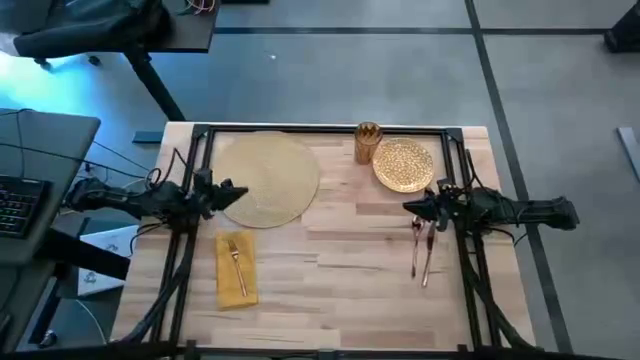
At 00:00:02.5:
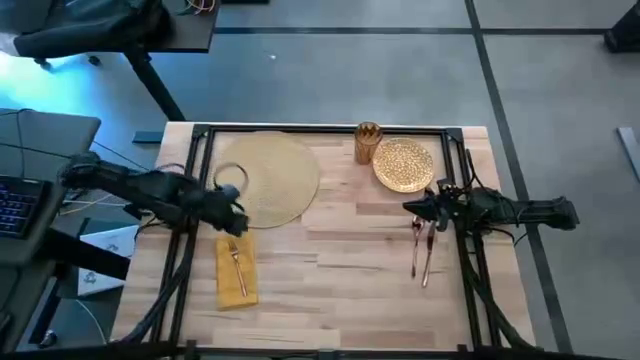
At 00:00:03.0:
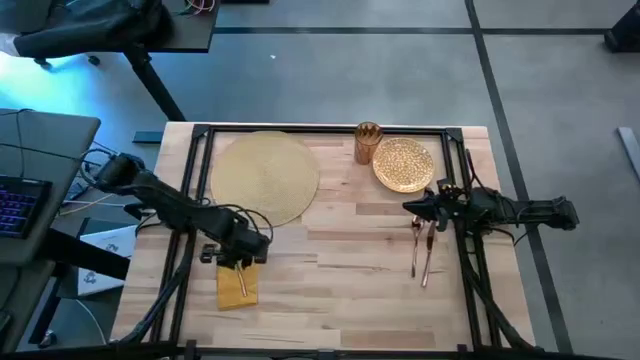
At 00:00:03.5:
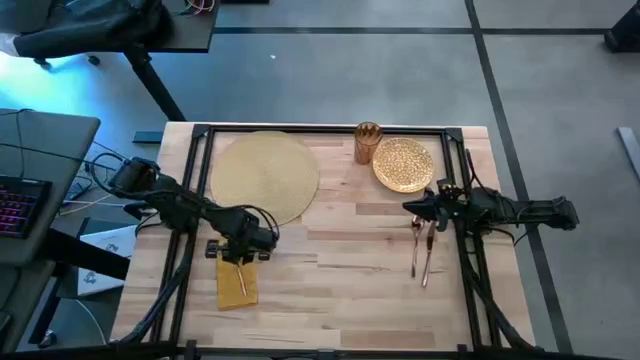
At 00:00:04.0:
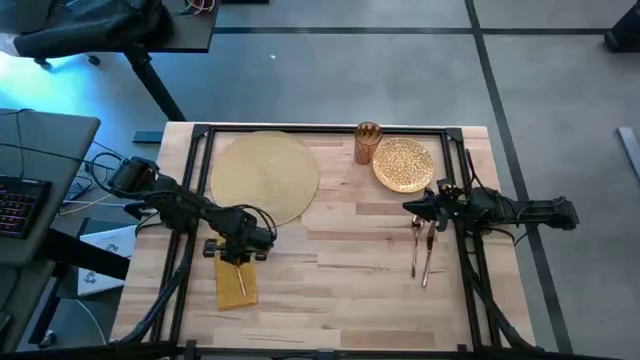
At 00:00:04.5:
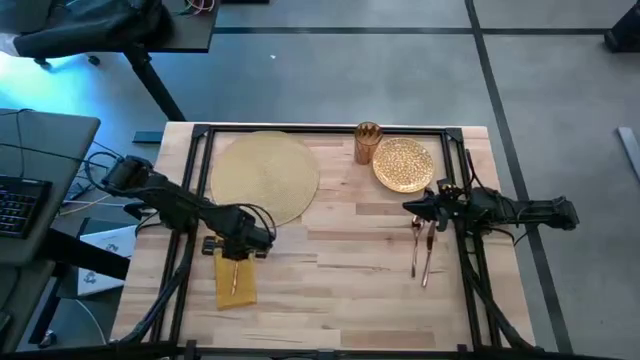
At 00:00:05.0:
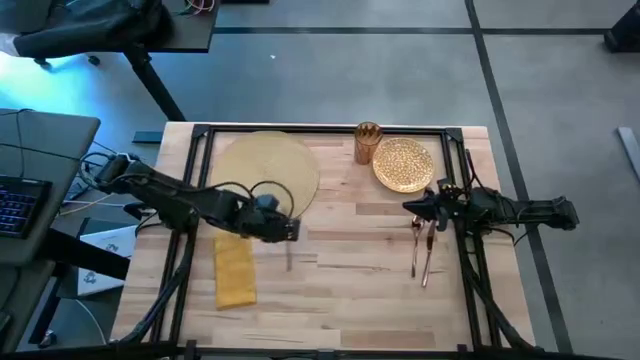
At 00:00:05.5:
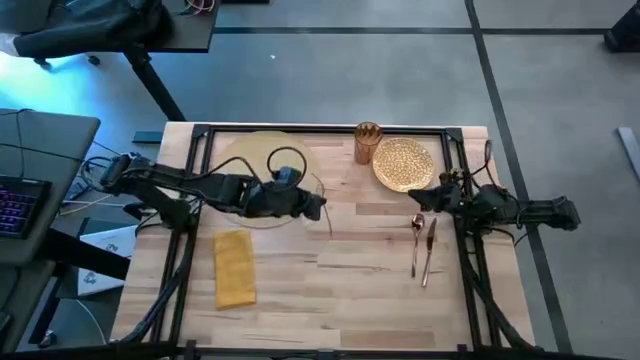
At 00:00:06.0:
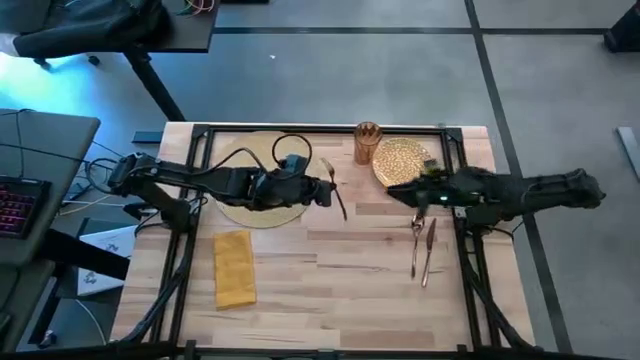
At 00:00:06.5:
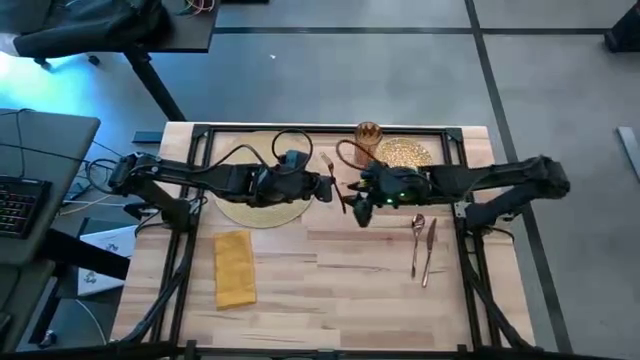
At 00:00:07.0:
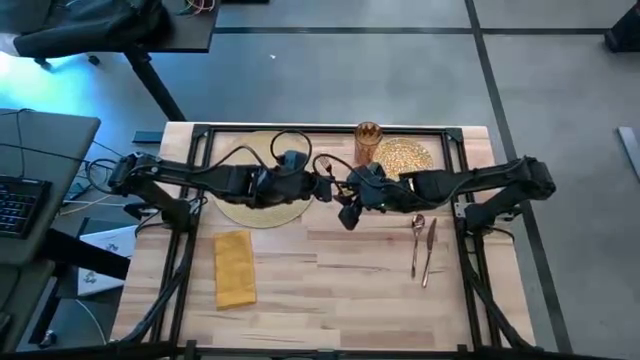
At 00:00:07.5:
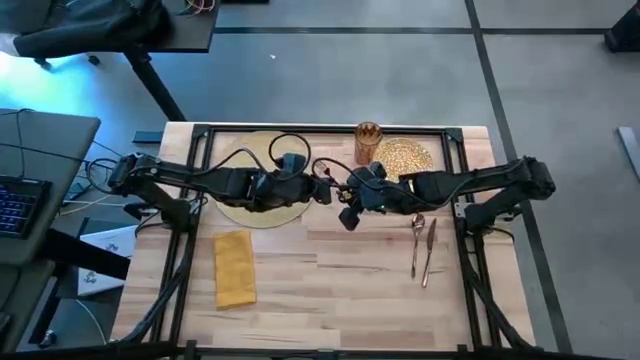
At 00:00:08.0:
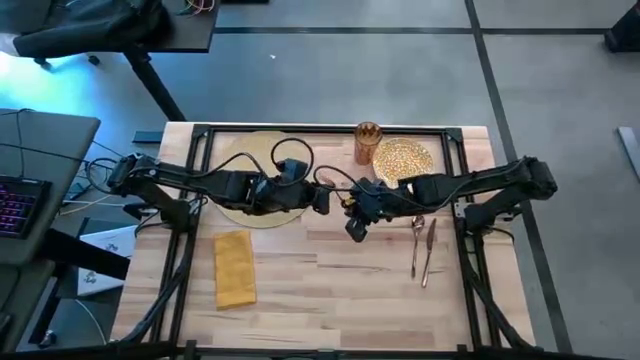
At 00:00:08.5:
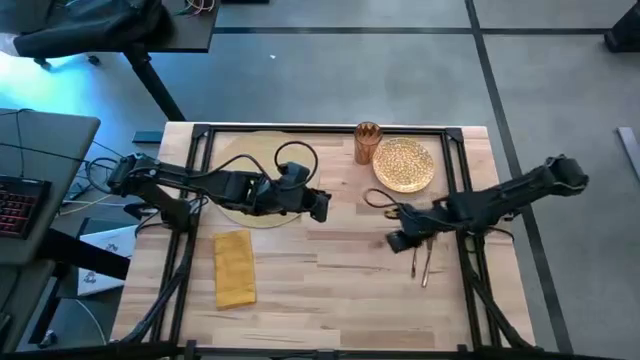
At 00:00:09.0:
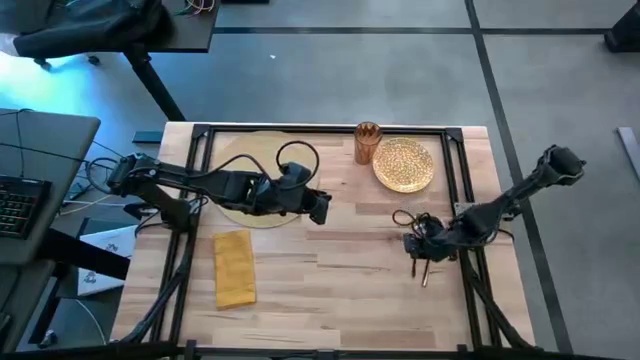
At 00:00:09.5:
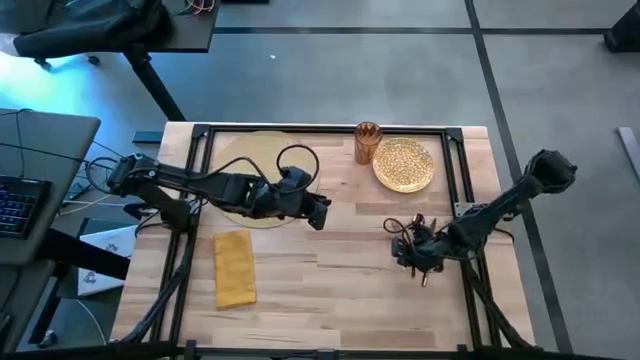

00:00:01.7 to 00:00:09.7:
Task: Set table place
Move the brown fork to the middle right of the table

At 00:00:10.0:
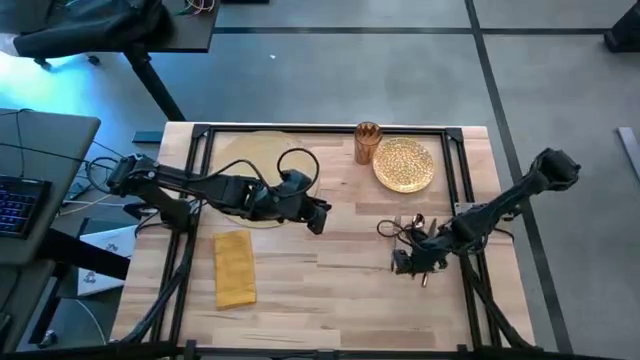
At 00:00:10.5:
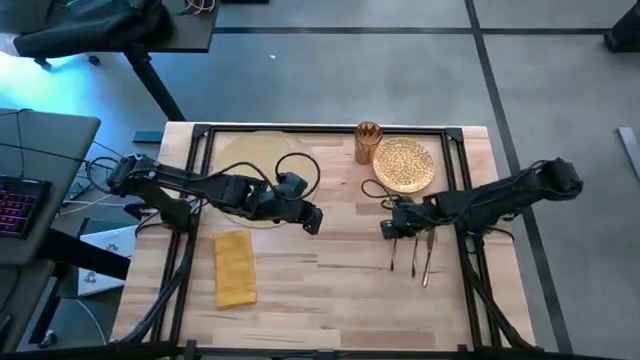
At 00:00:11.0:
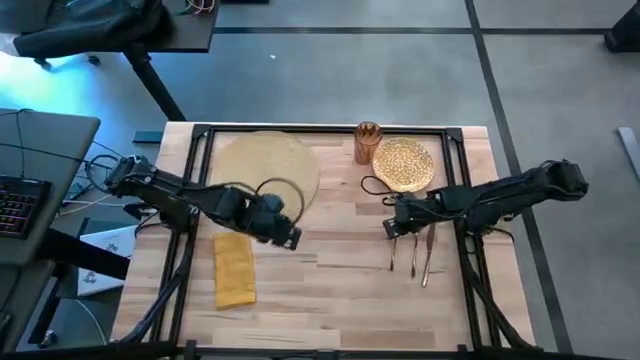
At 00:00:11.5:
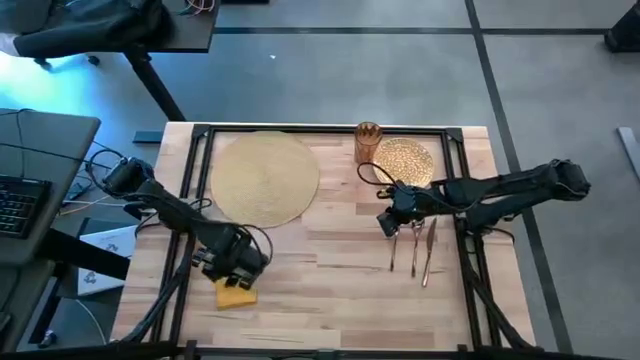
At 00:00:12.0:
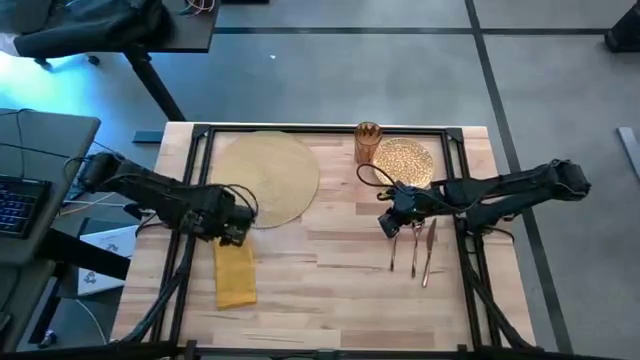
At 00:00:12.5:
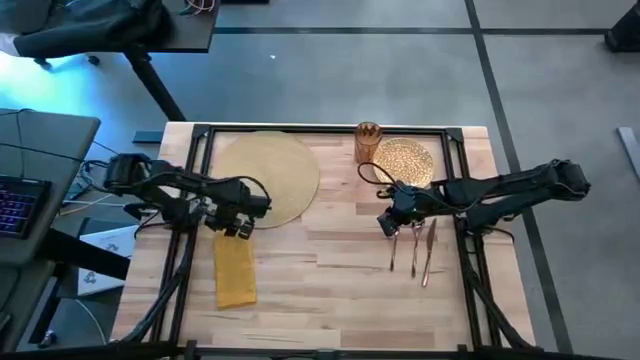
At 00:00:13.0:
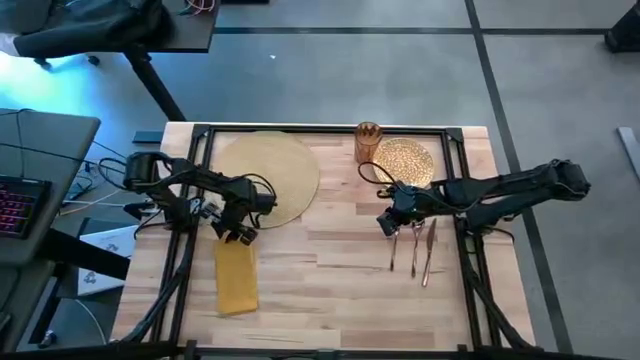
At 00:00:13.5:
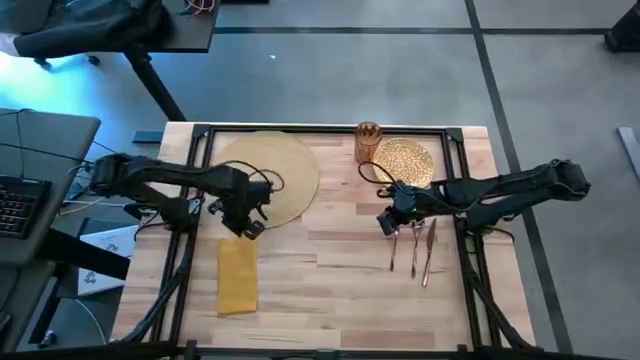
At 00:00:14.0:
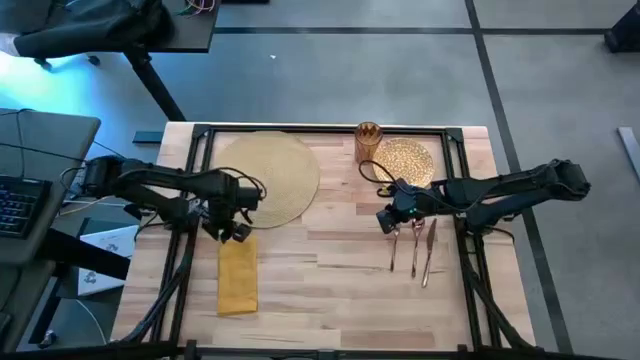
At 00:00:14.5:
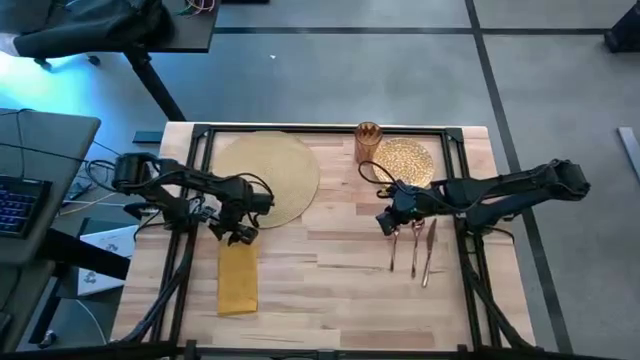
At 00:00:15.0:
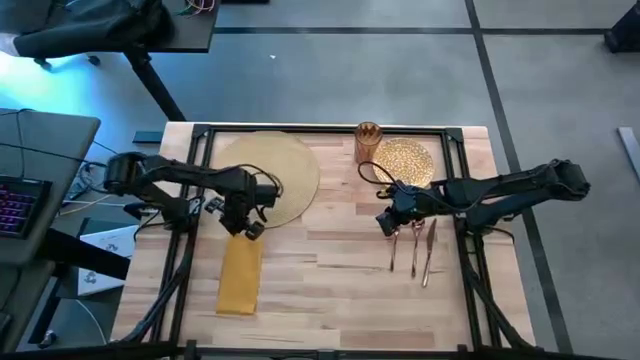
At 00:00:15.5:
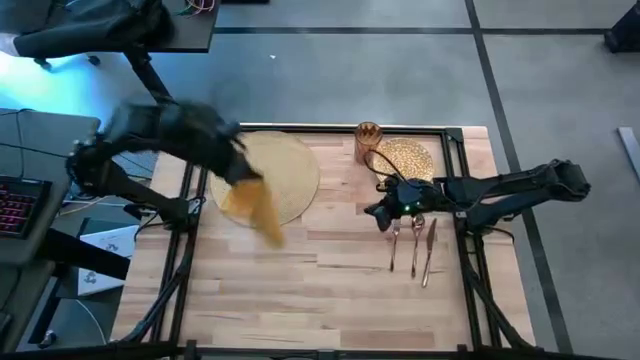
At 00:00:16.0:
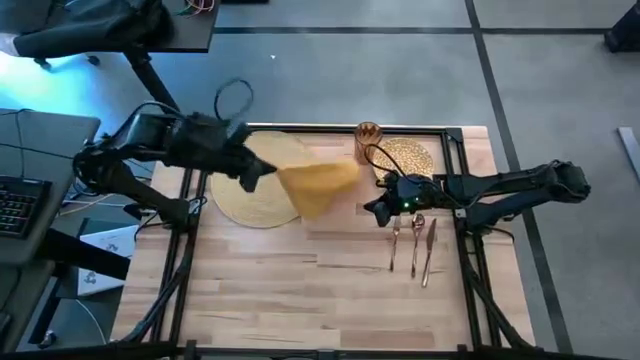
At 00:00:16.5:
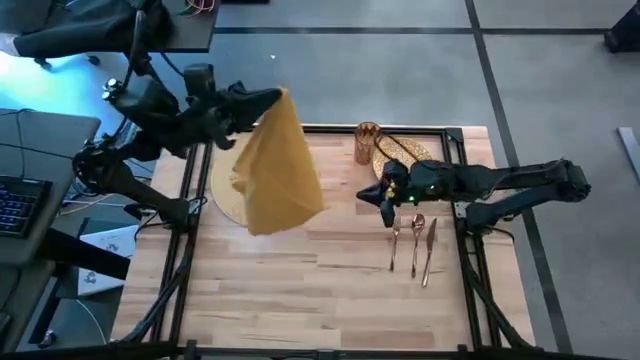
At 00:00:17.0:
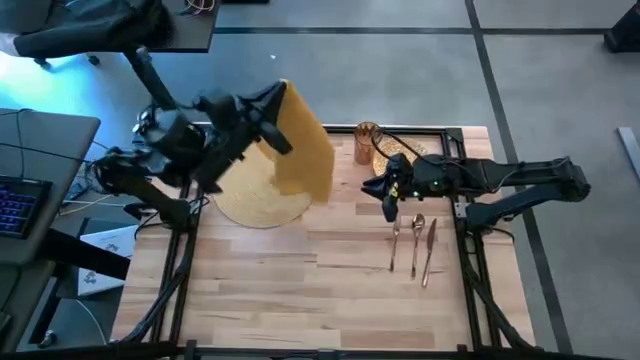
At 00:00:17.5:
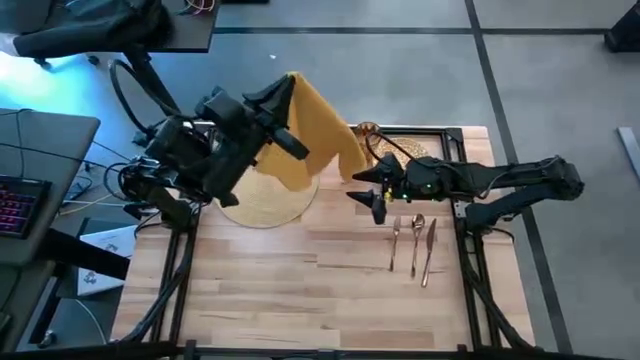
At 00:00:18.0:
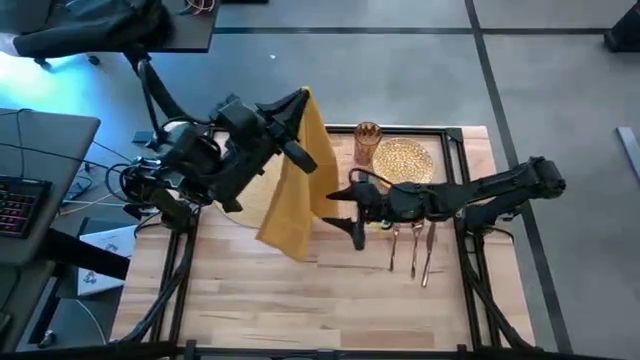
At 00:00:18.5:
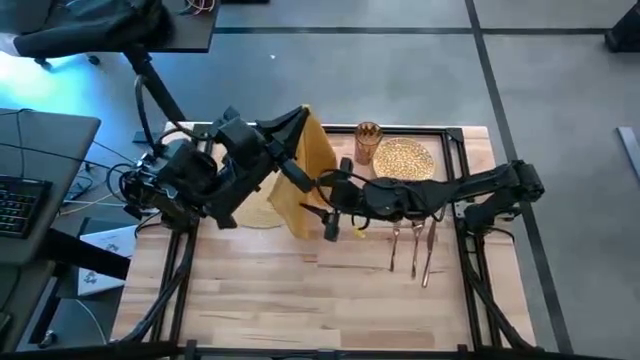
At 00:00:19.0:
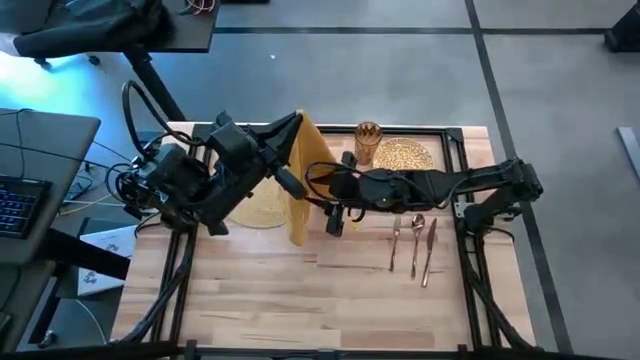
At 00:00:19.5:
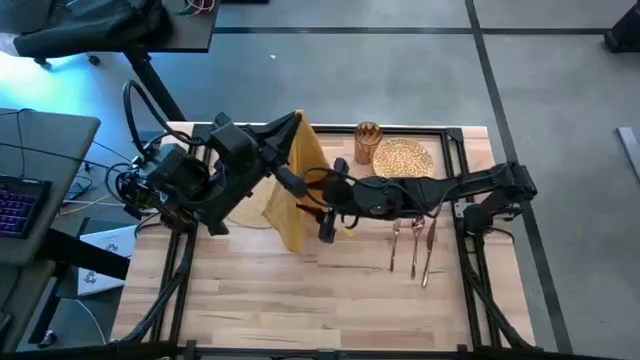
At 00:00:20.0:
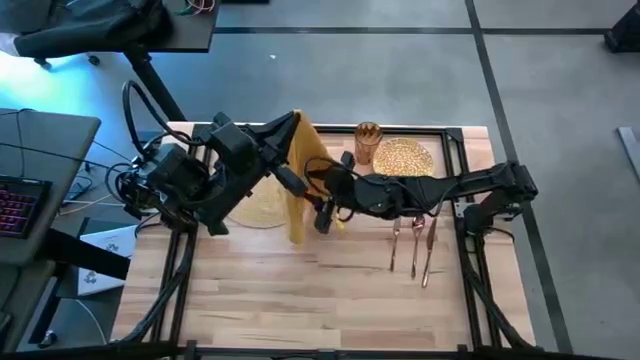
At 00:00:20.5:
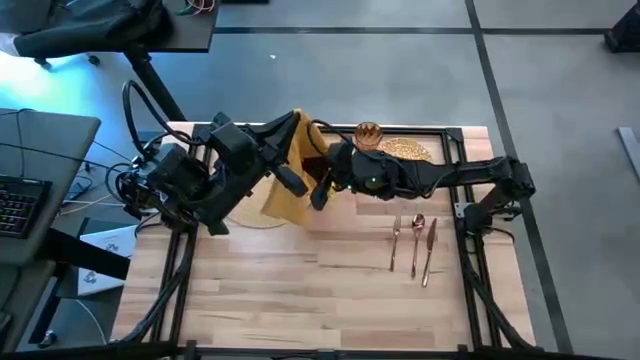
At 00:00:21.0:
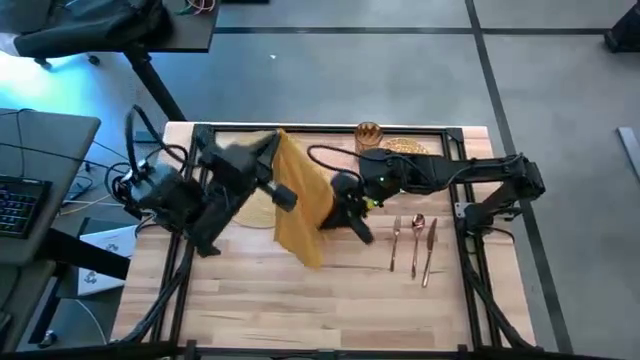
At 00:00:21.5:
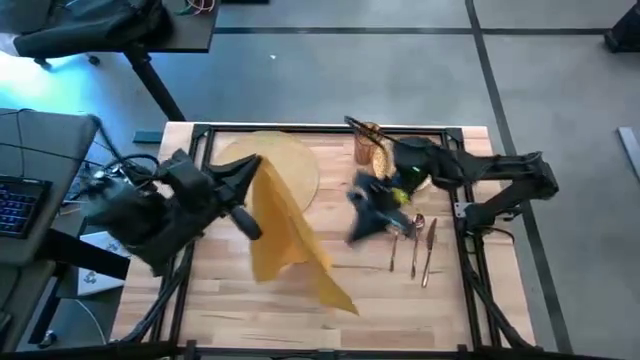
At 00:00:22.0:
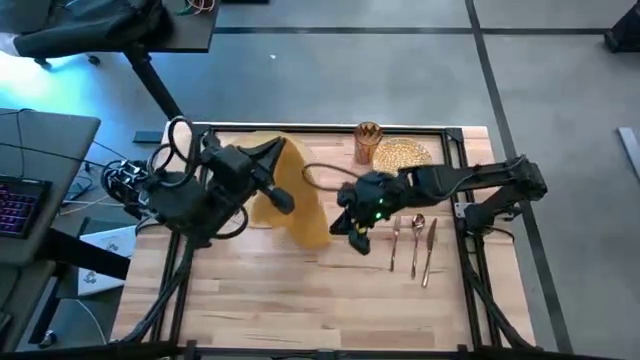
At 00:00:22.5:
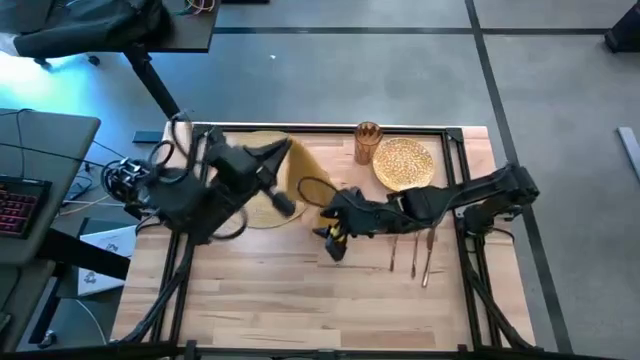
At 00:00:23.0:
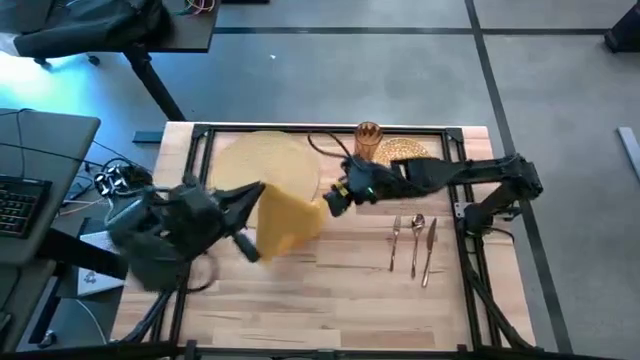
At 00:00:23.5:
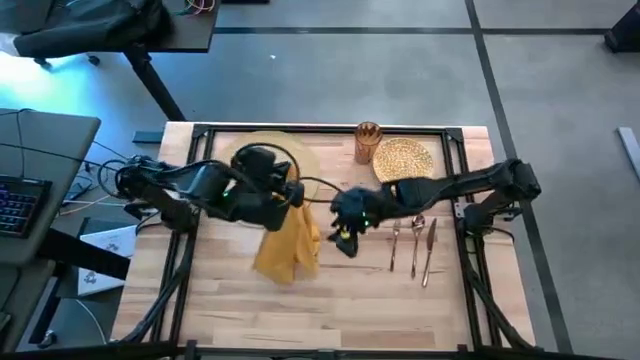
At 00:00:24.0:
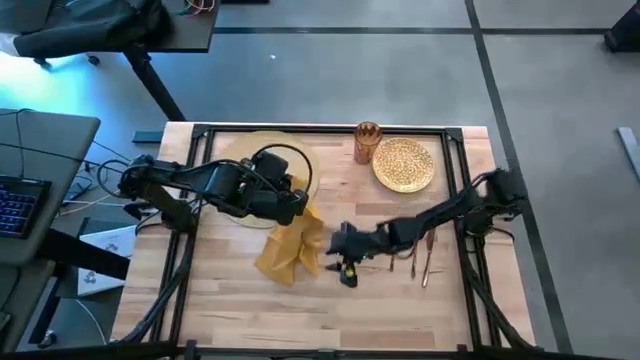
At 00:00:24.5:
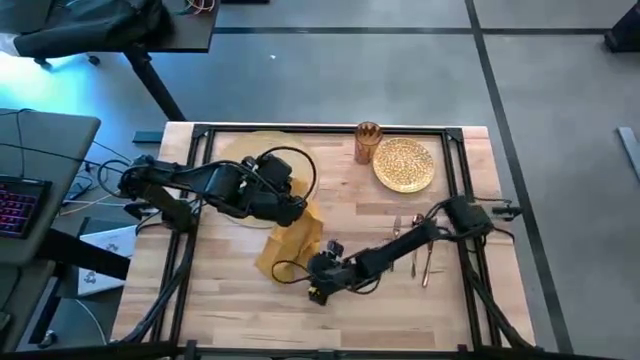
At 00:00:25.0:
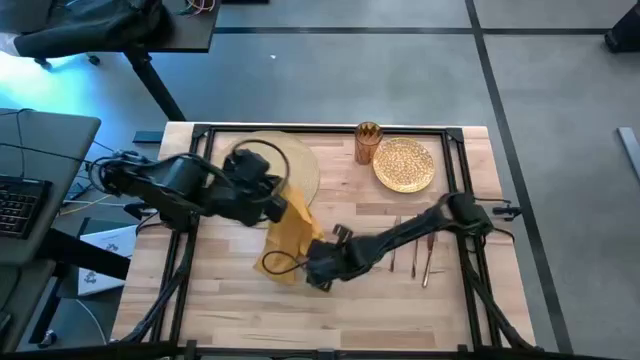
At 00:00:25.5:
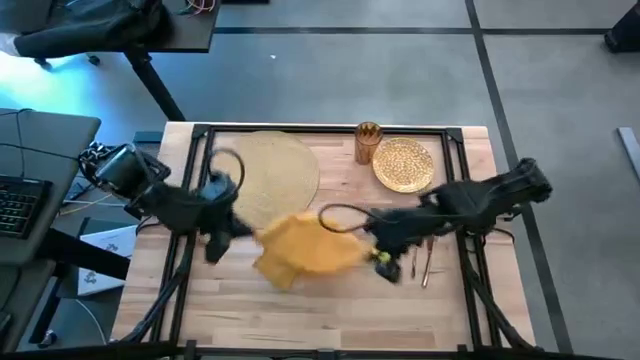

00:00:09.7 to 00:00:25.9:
Fold the yellow table napkin
